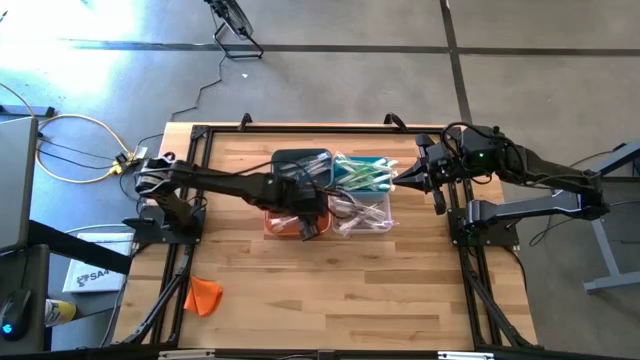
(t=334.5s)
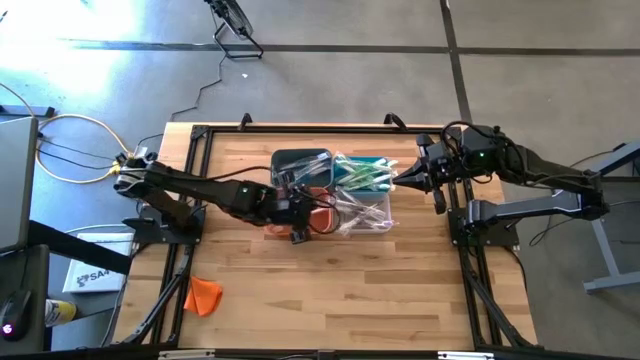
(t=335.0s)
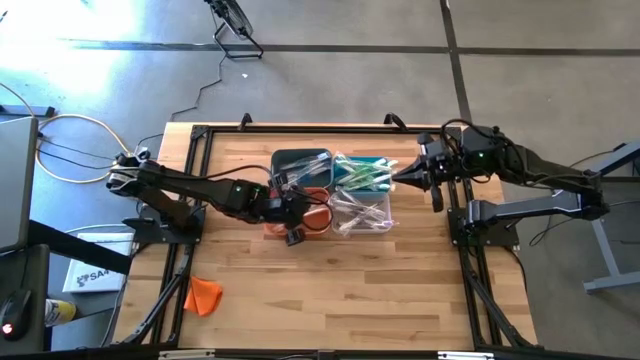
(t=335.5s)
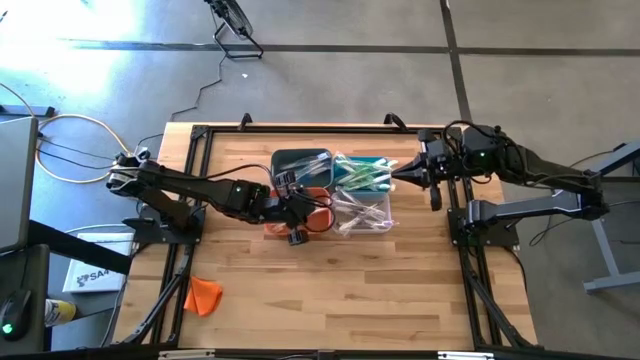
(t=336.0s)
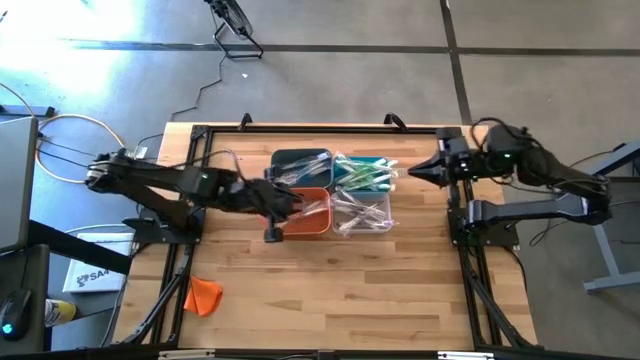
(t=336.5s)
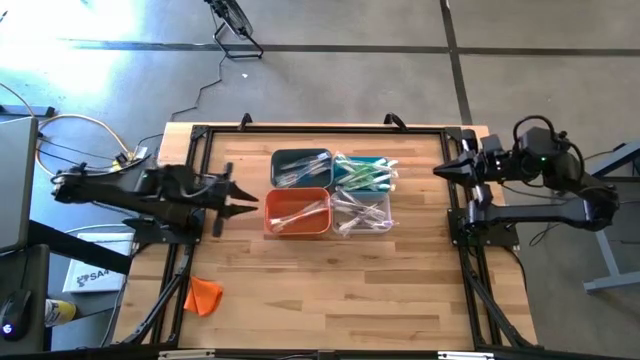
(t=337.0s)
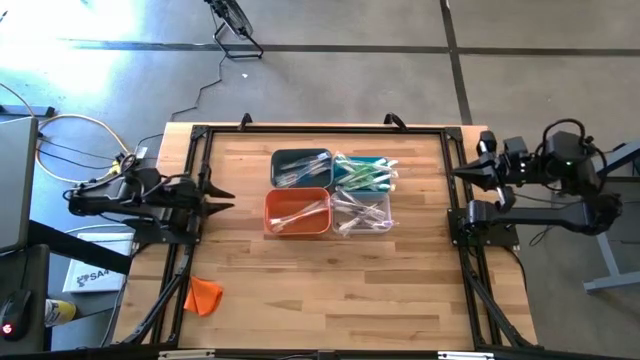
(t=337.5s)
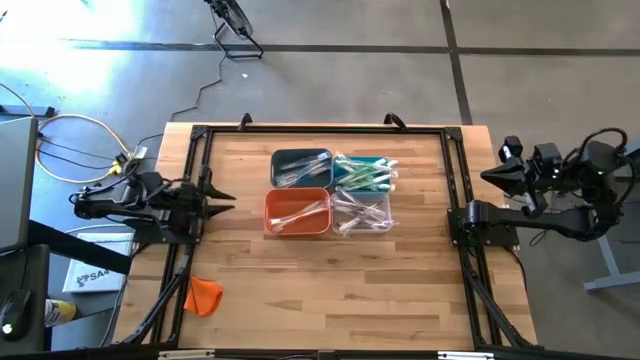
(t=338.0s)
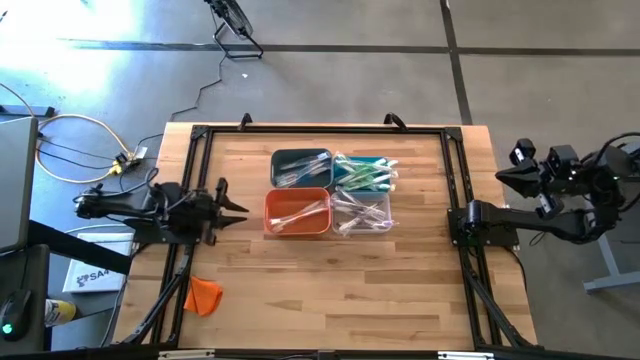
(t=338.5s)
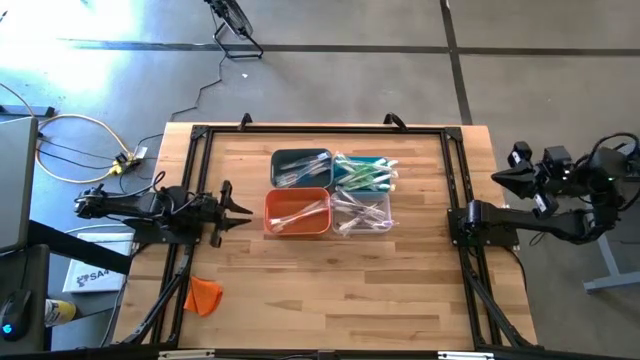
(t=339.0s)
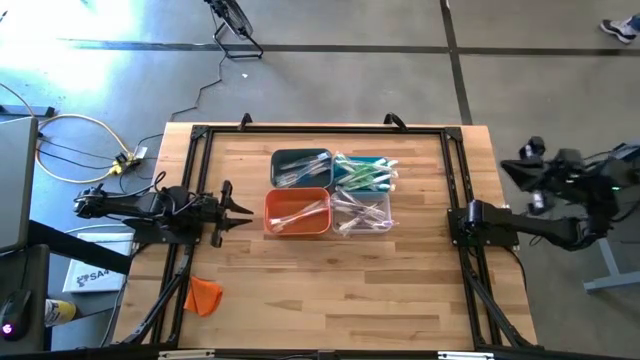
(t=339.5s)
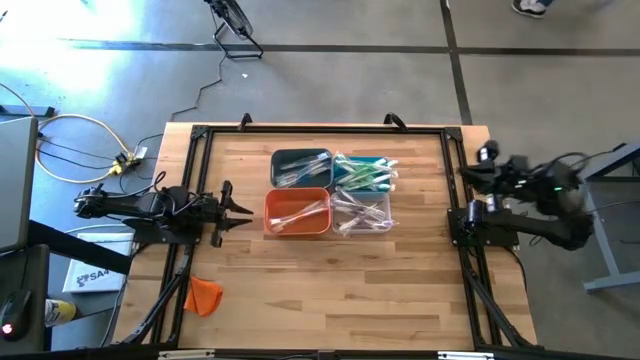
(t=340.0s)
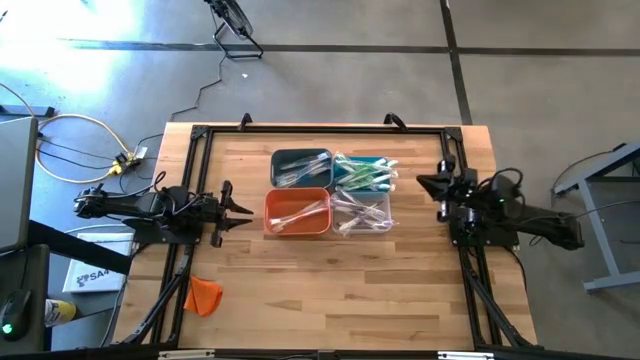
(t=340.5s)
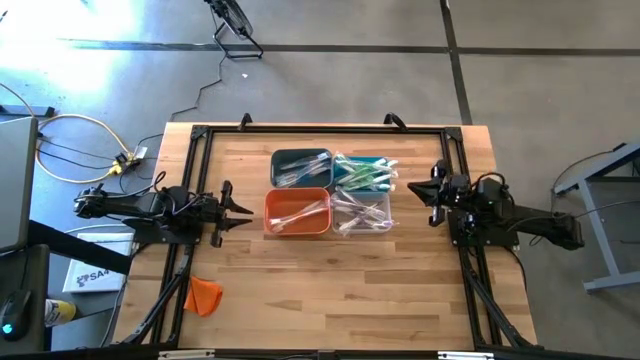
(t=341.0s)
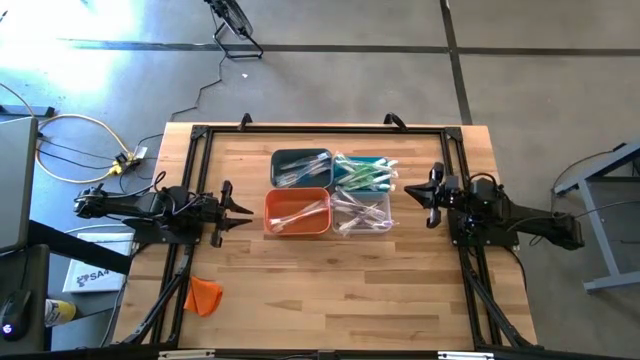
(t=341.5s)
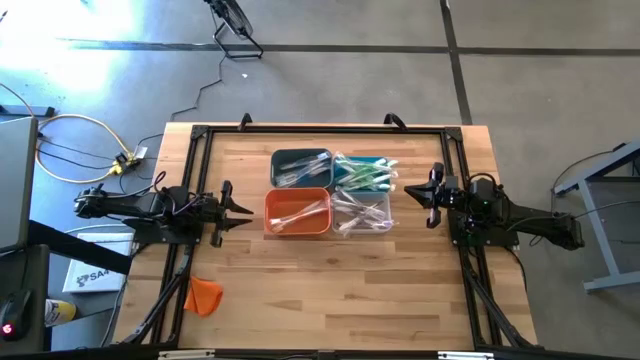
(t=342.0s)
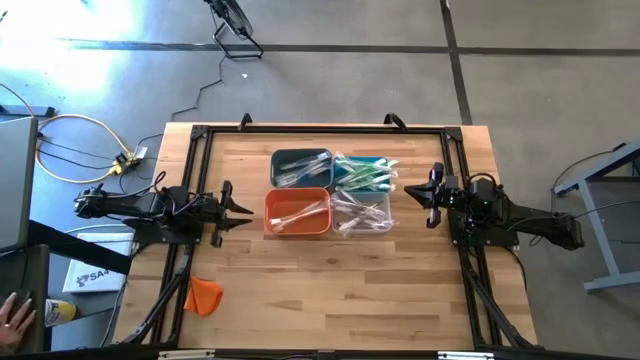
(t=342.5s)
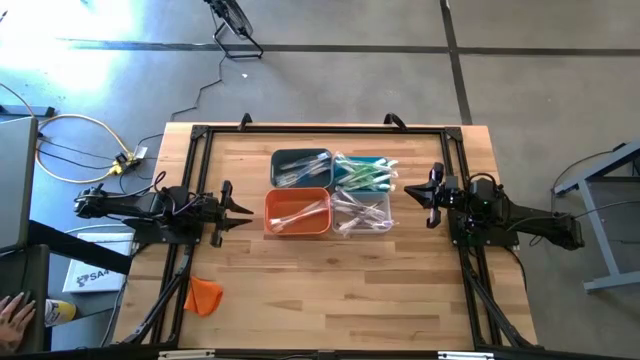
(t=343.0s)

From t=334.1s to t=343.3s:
Task: Pick & Place Toothbrushes
Return to Home Position

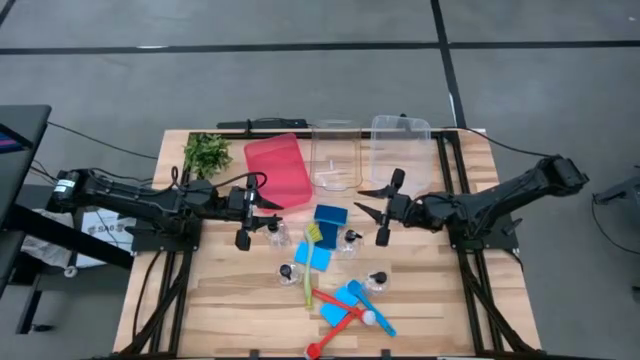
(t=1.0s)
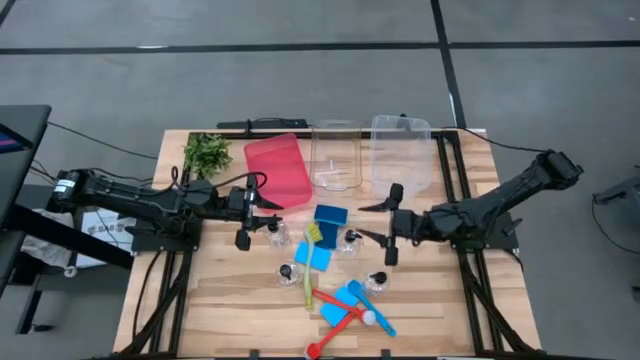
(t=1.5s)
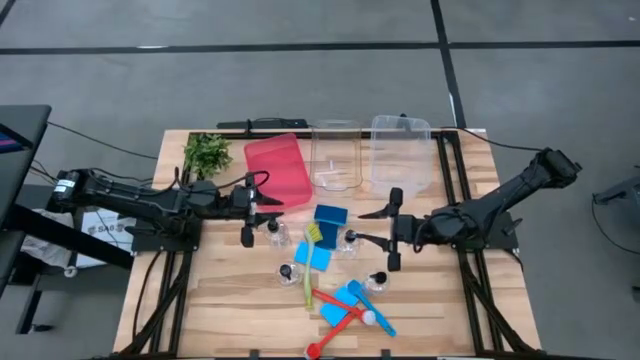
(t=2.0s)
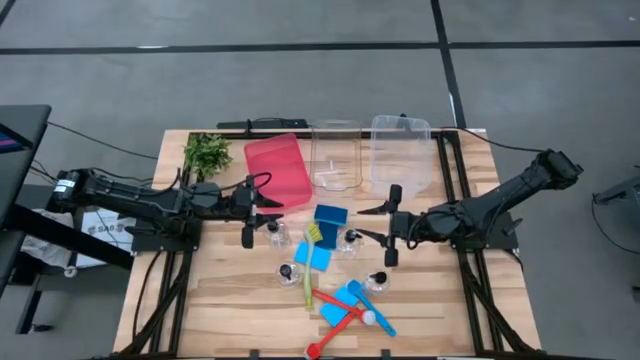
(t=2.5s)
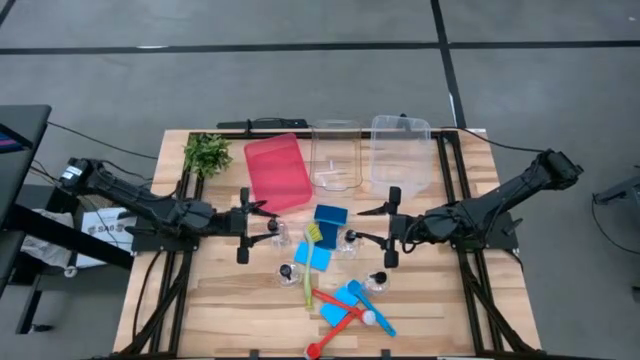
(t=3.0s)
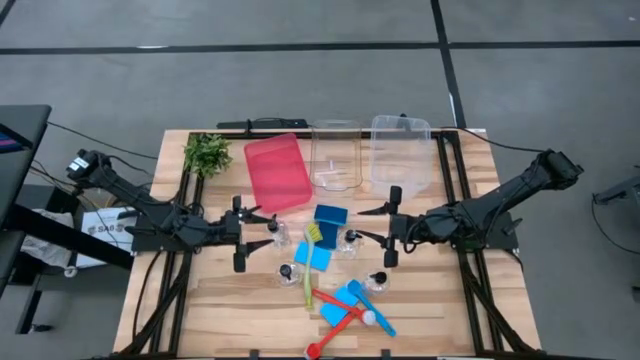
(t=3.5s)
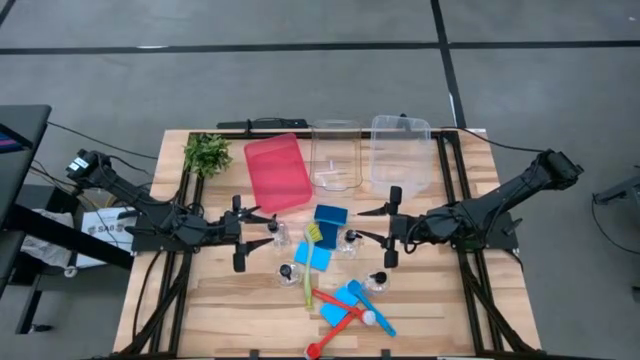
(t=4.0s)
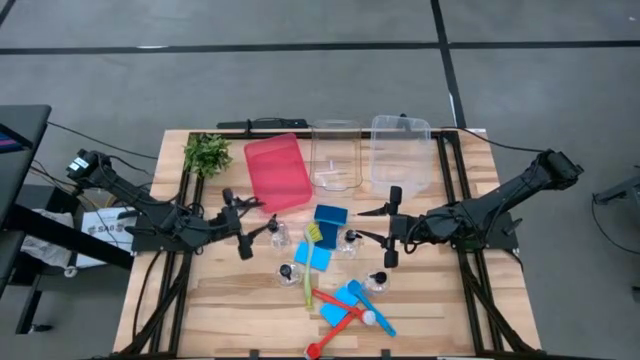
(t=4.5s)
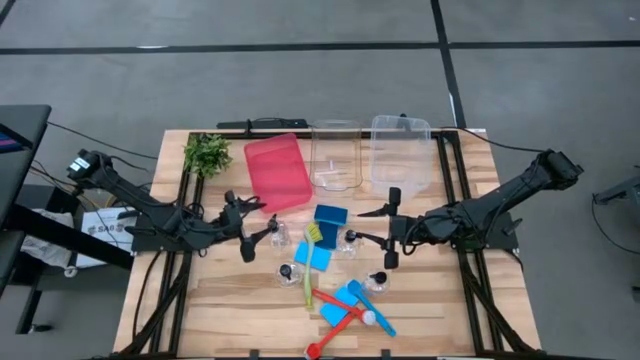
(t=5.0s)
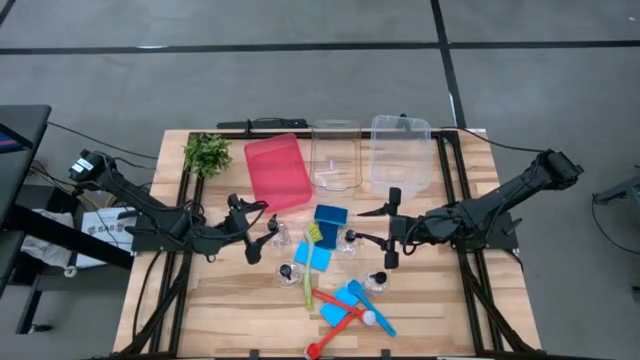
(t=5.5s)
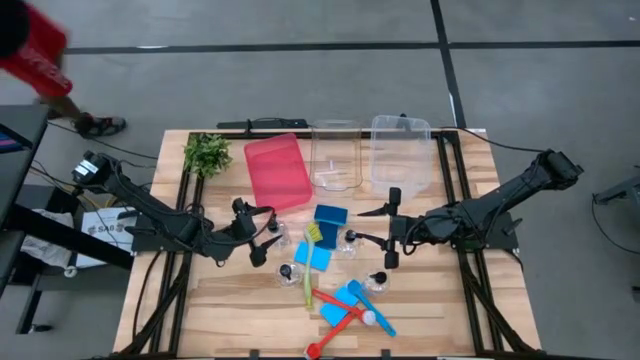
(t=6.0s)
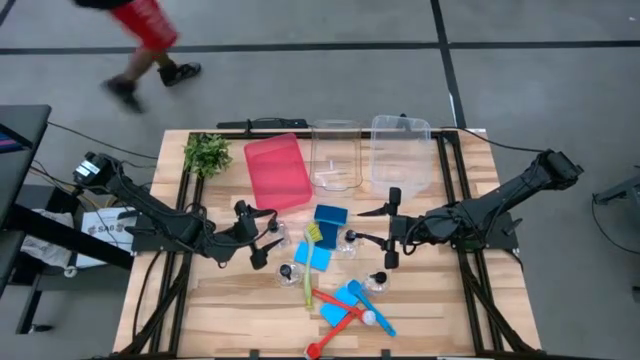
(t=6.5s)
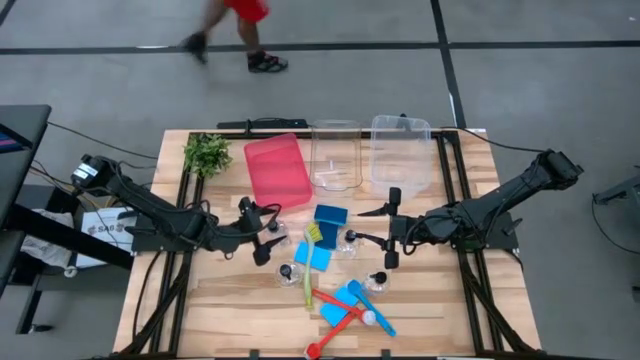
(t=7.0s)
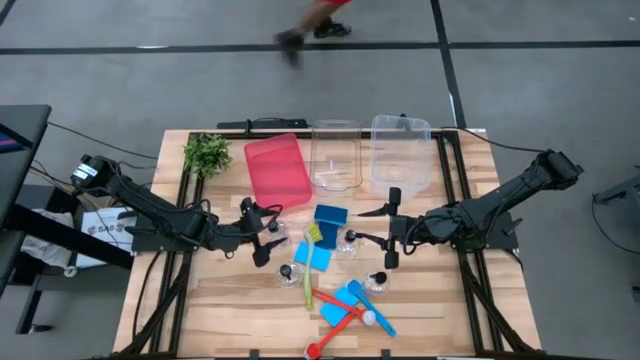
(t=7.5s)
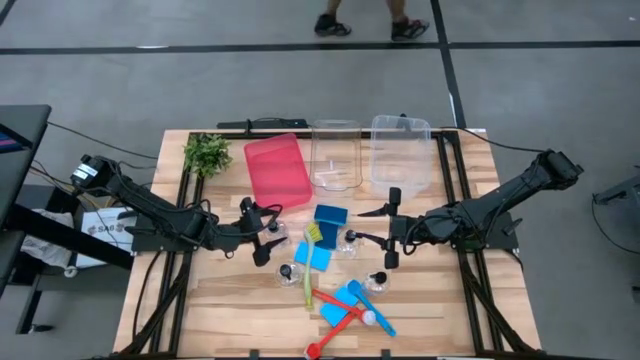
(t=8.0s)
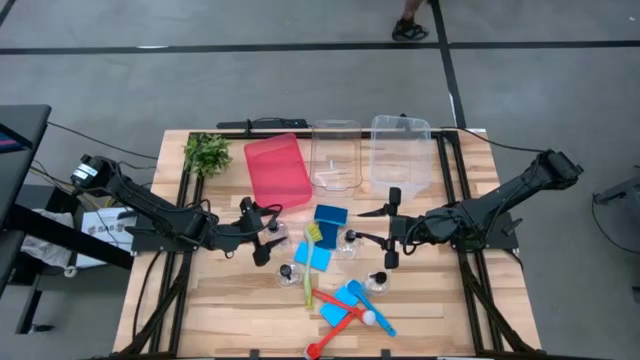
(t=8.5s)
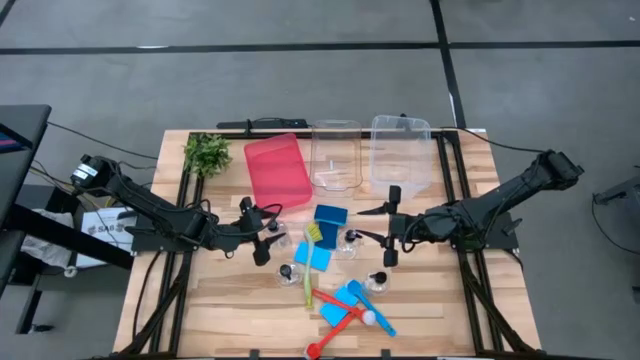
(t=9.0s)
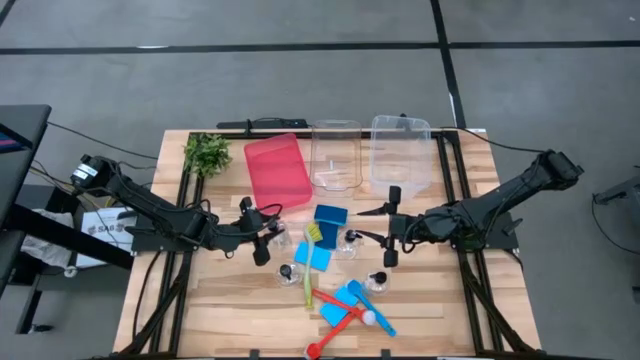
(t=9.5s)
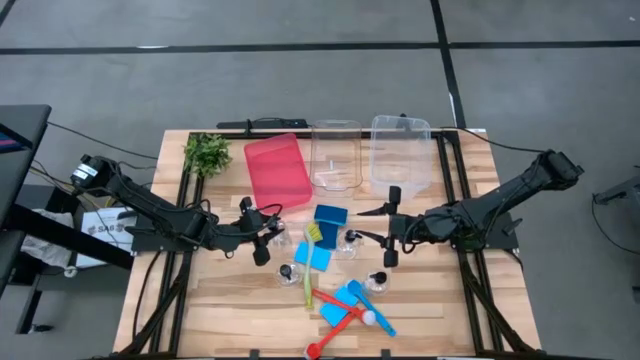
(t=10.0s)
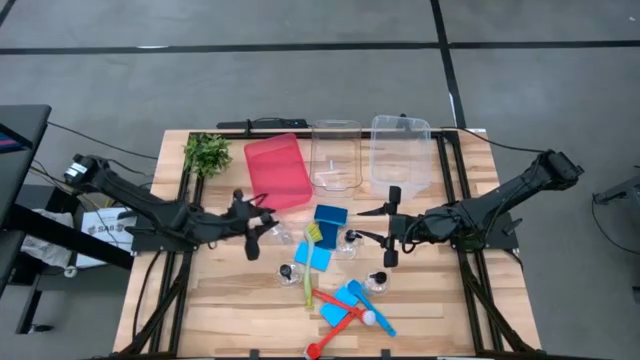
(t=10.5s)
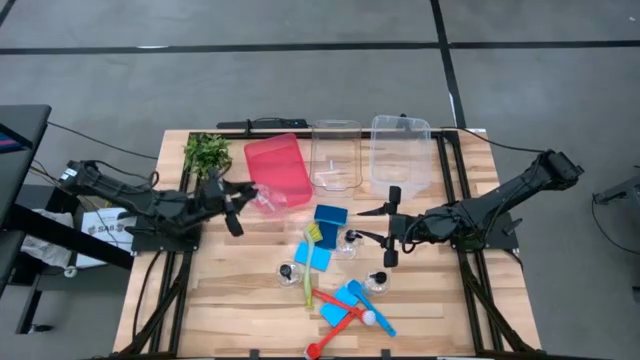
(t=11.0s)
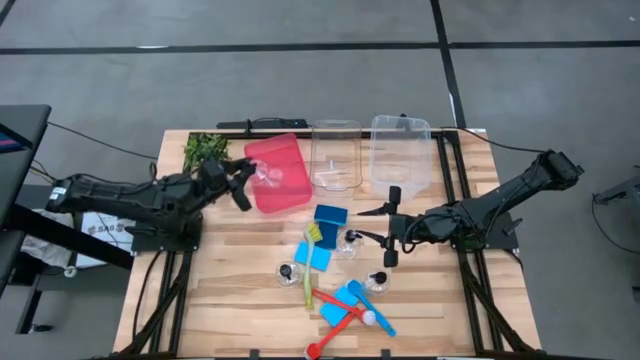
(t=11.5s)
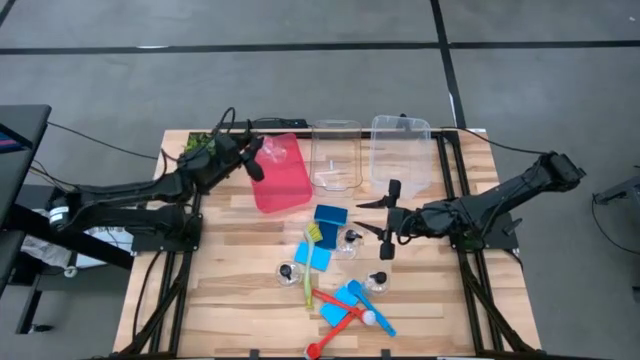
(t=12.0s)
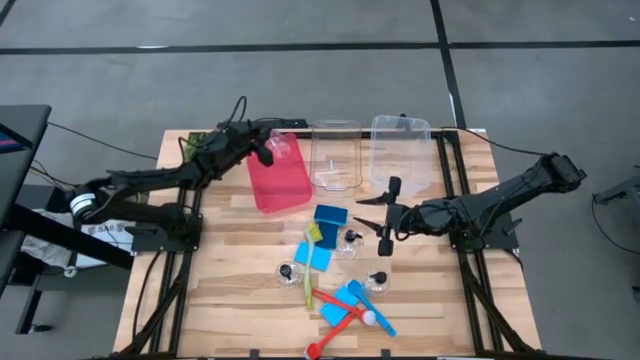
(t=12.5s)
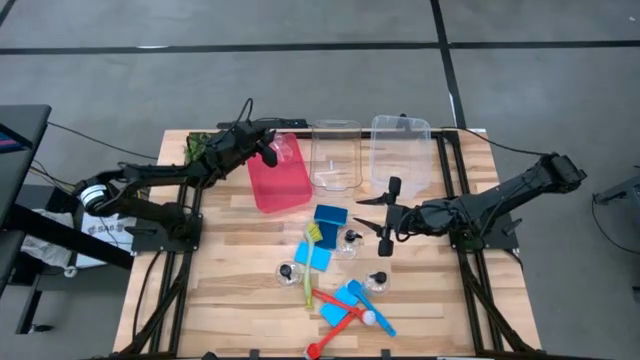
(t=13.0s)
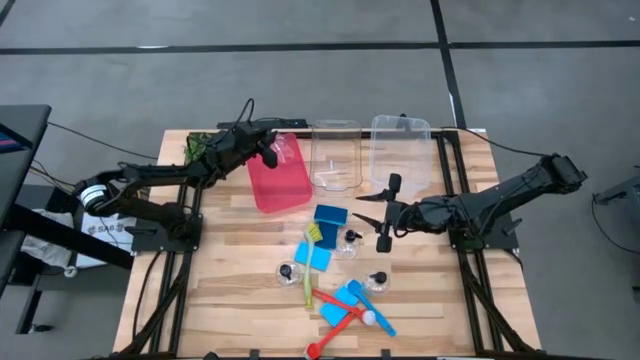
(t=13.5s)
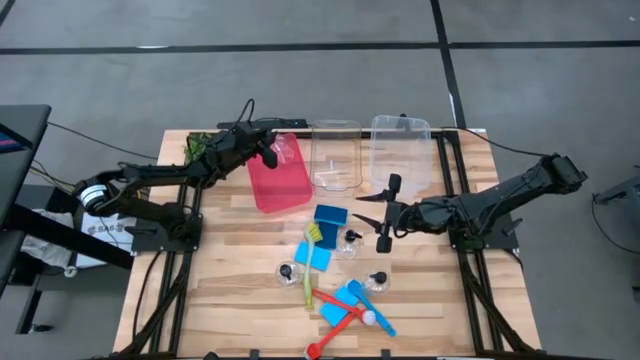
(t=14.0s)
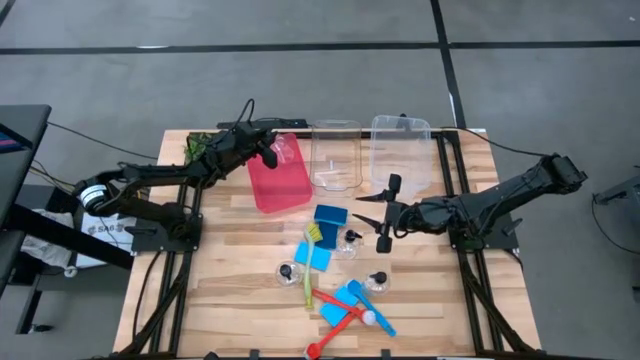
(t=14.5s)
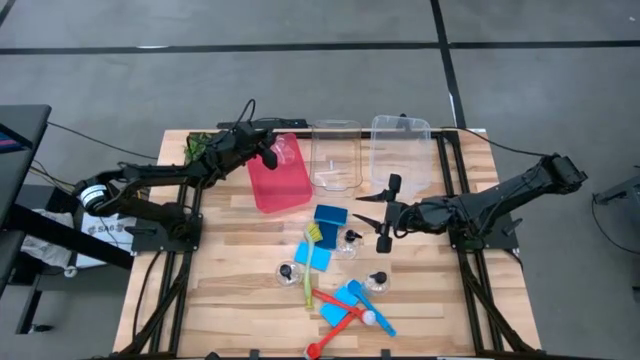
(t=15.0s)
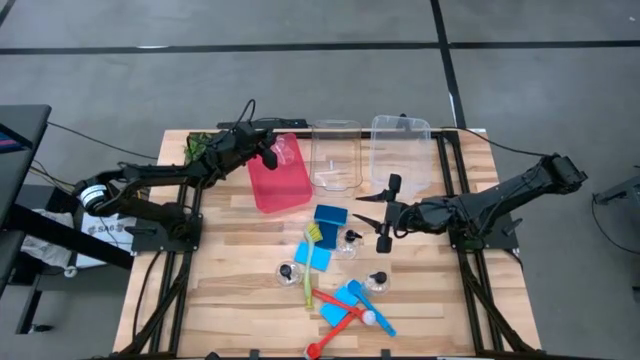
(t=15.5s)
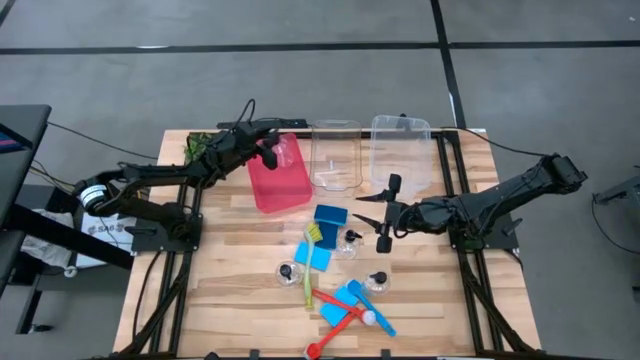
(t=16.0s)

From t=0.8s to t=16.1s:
Task: Pick & Place Kitchen Sink Supplies
Put the transparent soap dispenser into the red bin
